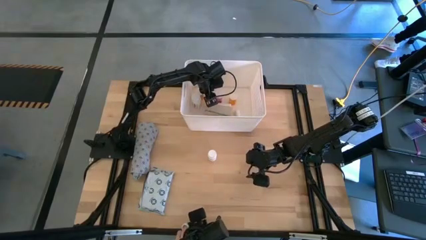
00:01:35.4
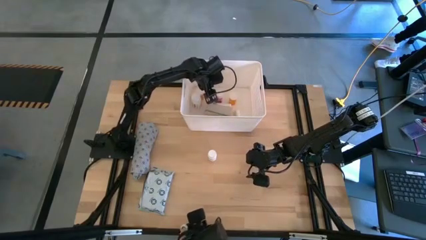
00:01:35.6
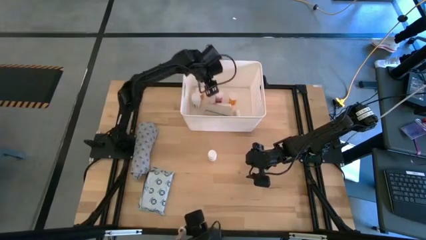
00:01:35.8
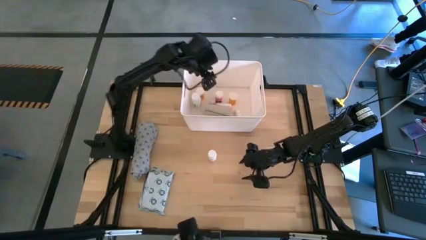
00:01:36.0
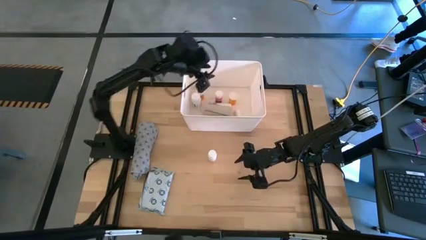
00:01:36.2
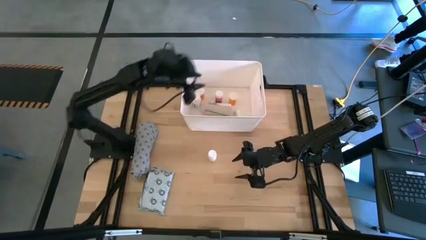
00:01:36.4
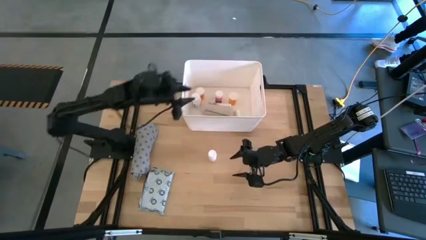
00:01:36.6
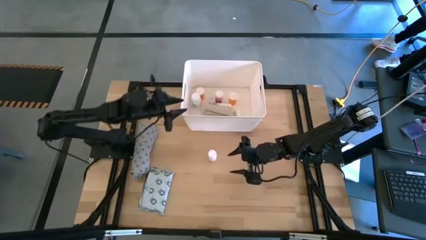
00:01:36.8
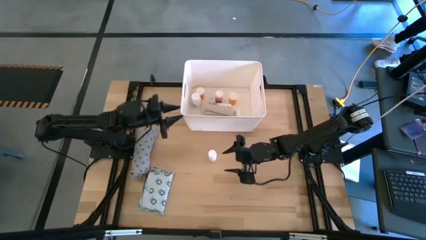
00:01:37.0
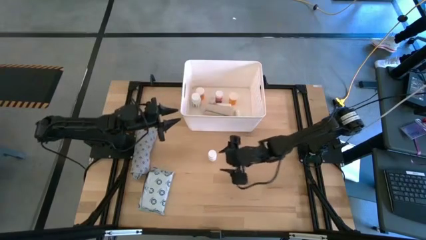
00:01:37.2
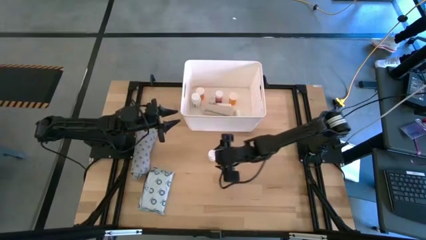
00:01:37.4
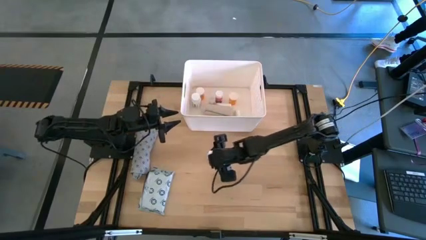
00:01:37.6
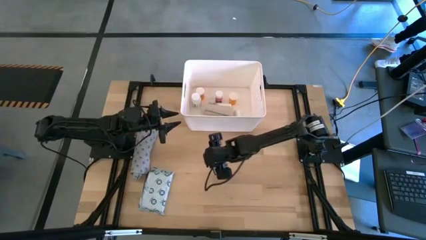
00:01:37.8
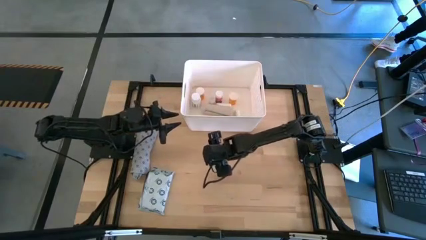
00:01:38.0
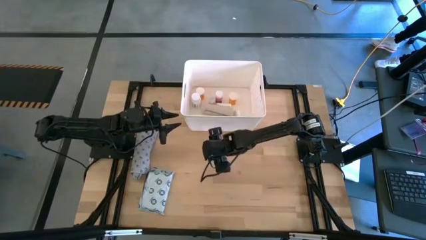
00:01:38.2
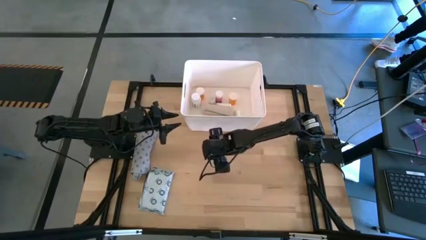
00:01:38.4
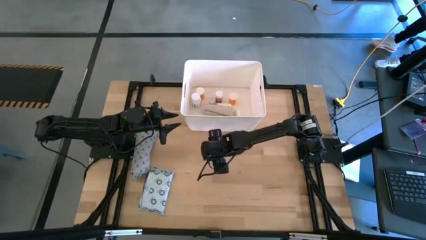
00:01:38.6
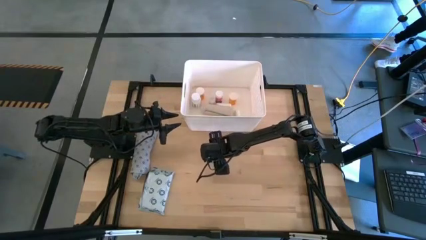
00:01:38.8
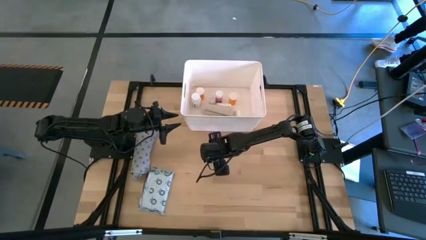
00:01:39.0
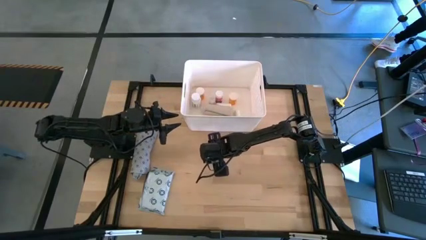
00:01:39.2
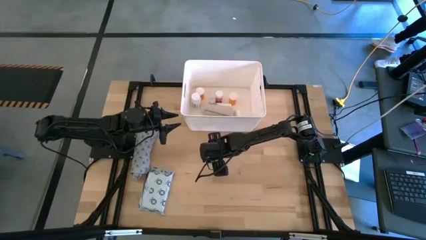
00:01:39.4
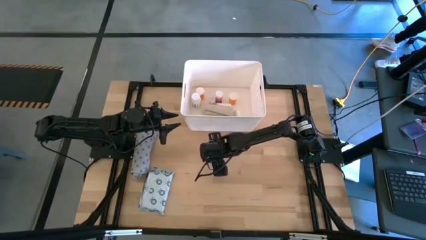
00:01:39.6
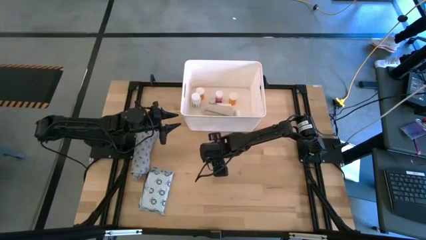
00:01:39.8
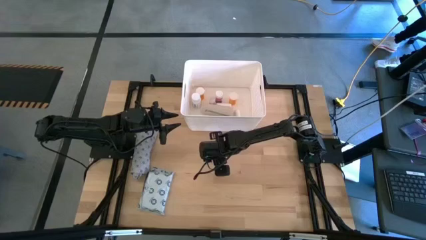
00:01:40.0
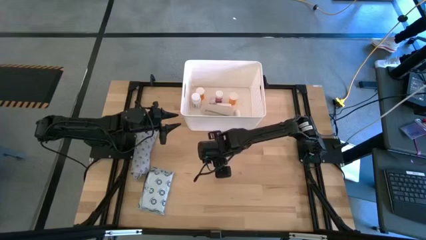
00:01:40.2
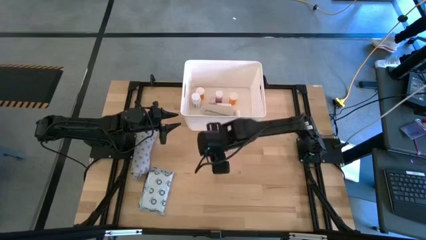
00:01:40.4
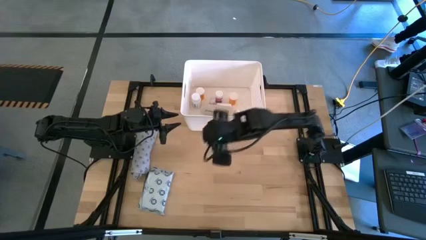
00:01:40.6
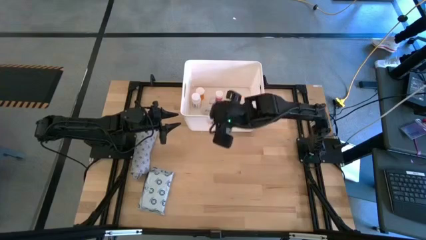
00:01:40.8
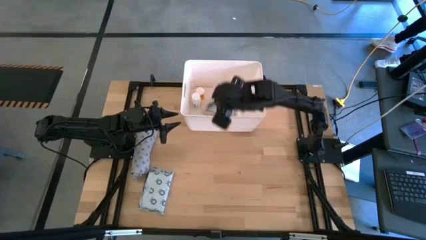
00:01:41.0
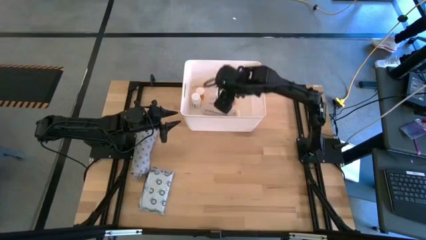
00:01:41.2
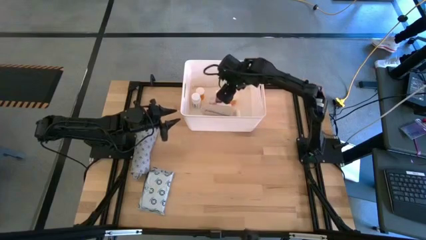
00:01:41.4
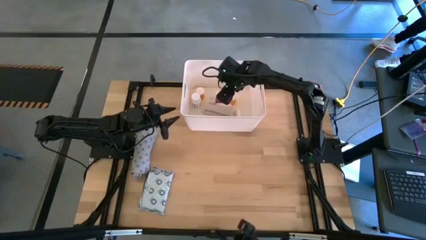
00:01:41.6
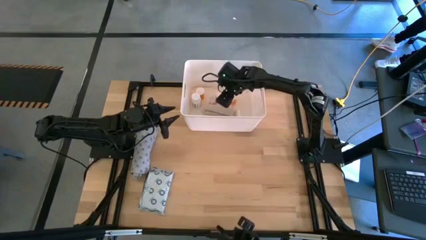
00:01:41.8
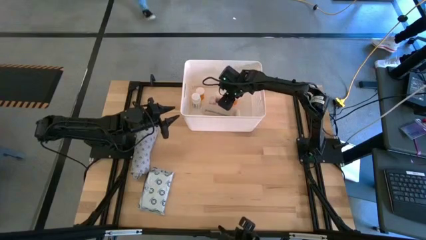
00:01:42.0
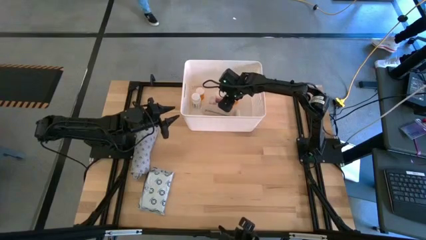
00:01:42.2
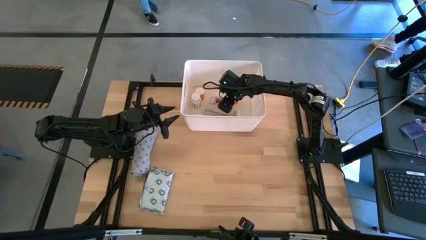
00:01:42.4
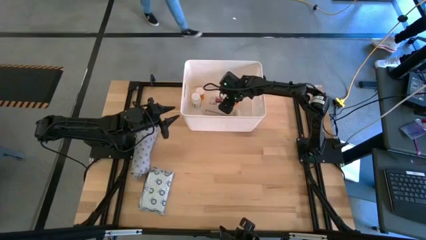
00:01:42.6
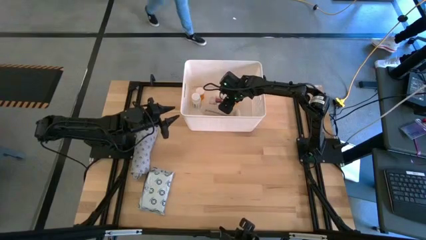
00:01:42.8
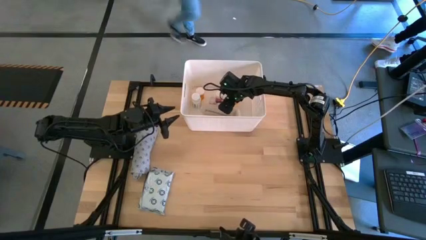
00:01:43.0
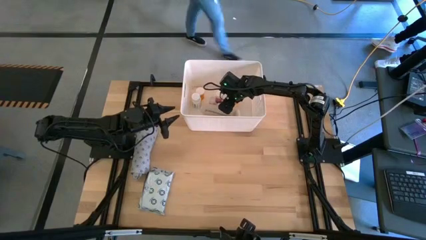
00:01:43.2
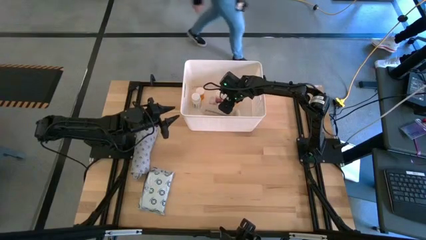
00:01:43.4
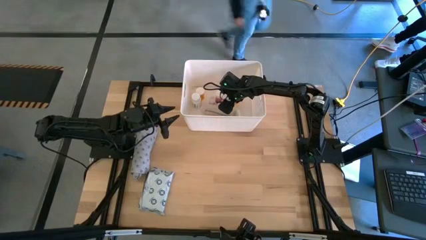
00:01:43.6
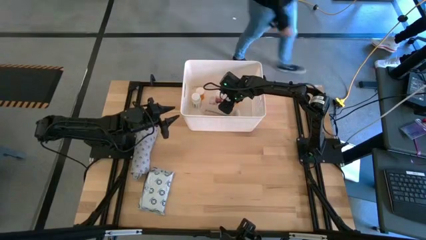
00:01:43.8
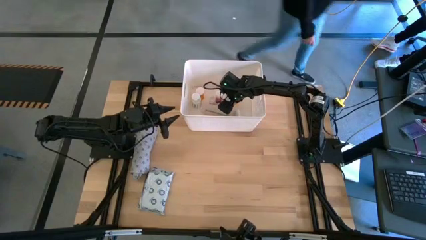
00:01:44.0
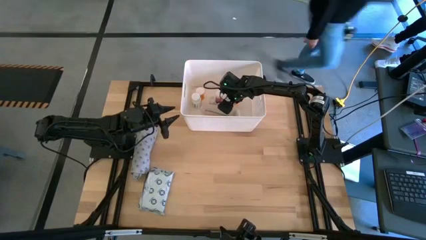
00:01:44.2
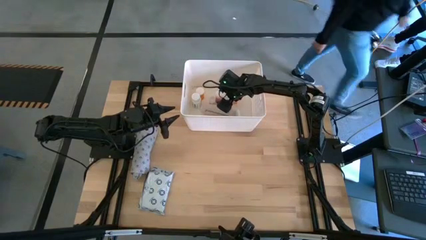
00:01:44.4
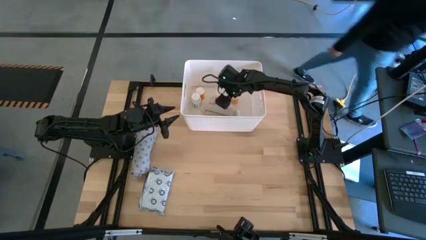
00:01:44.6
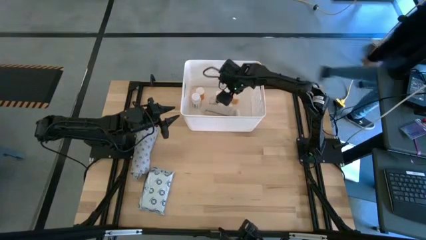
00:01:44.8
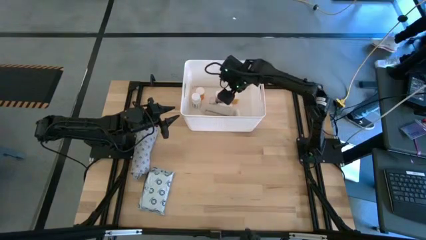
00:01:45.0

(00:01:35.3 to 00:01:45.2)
Task: Pick & place medical supplies in basket/bin
Put the white pill bottle into the white bin

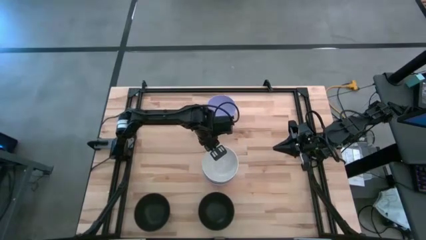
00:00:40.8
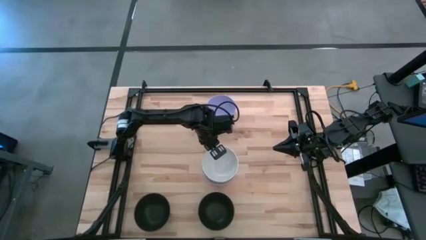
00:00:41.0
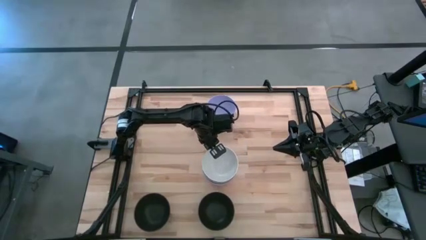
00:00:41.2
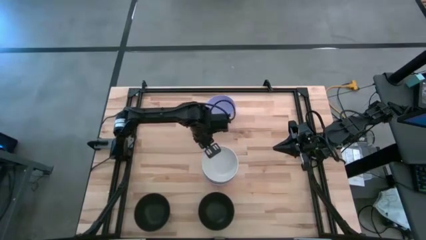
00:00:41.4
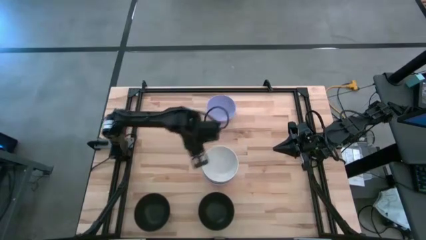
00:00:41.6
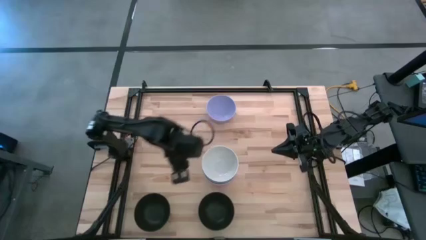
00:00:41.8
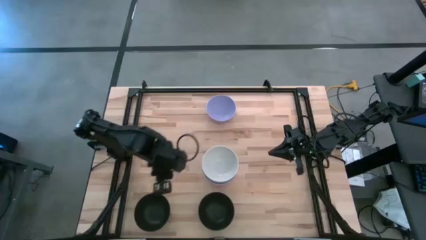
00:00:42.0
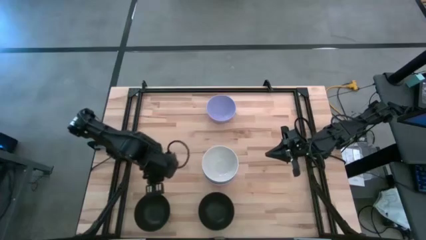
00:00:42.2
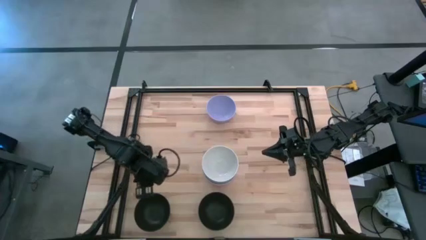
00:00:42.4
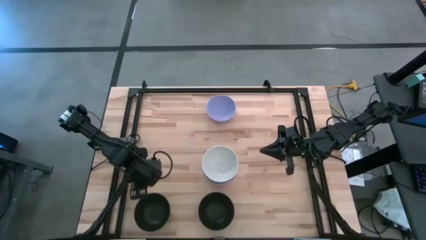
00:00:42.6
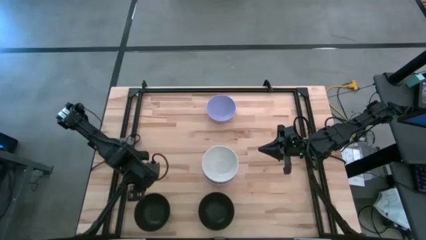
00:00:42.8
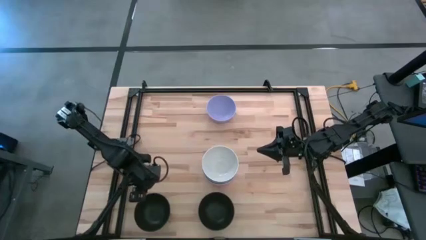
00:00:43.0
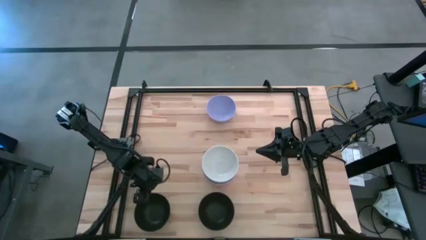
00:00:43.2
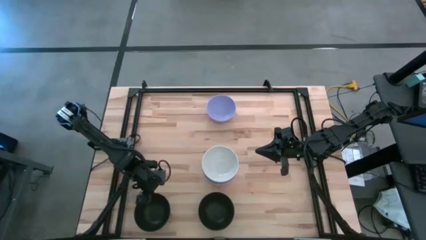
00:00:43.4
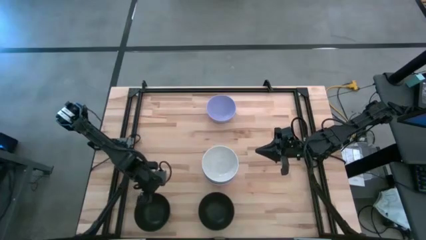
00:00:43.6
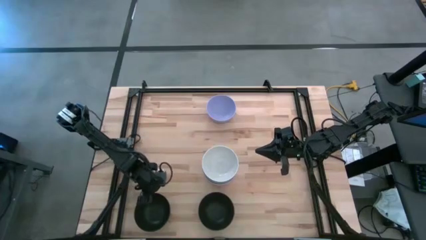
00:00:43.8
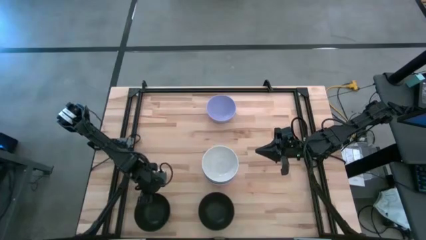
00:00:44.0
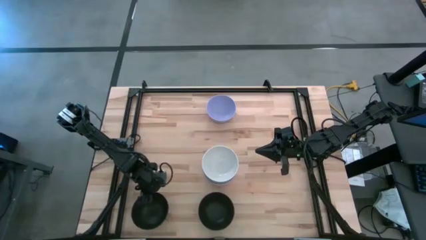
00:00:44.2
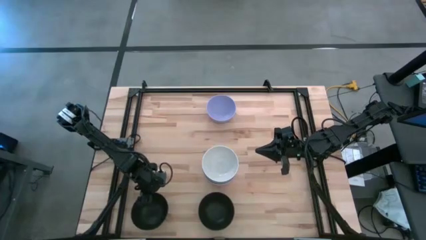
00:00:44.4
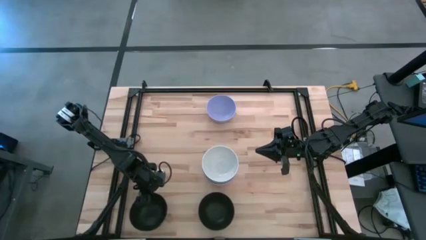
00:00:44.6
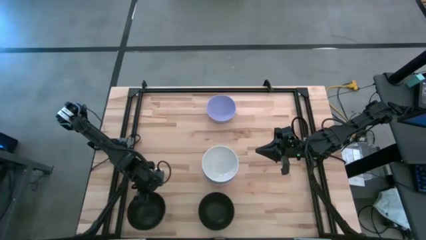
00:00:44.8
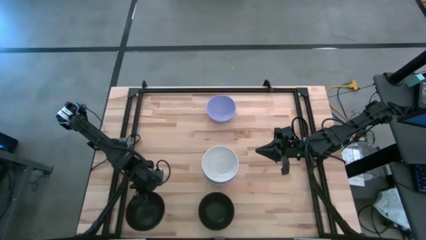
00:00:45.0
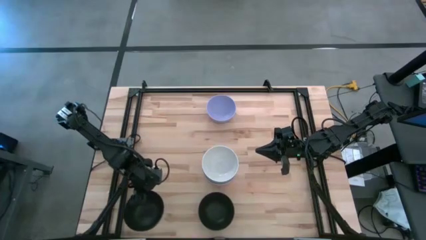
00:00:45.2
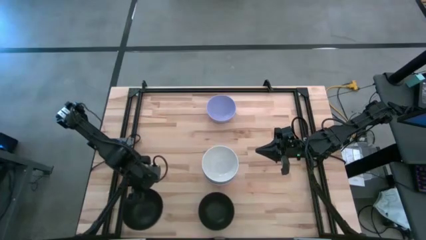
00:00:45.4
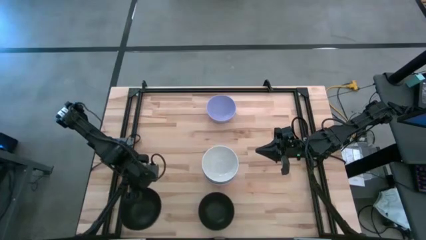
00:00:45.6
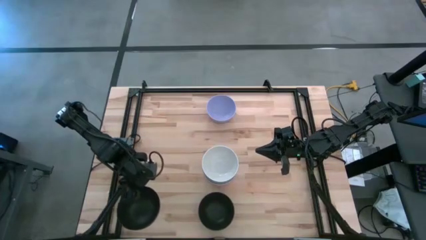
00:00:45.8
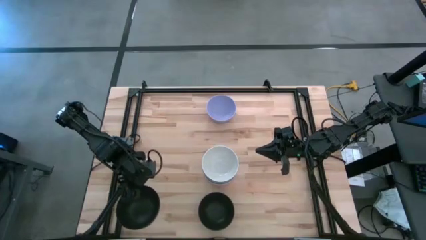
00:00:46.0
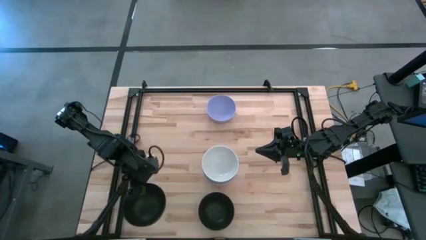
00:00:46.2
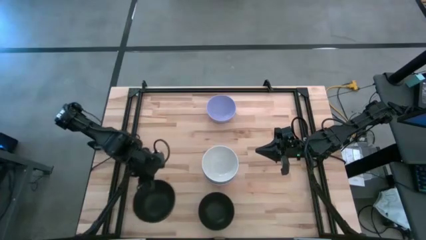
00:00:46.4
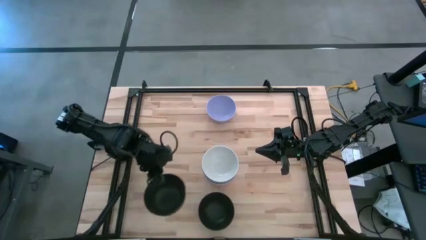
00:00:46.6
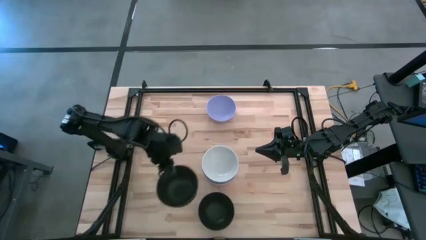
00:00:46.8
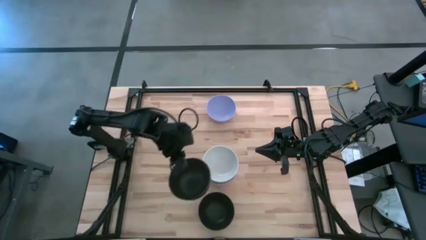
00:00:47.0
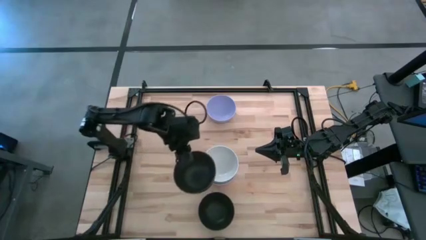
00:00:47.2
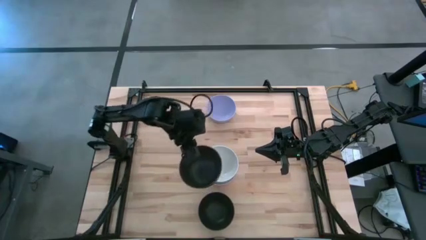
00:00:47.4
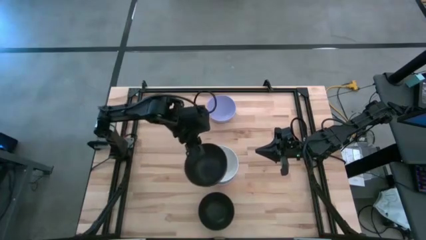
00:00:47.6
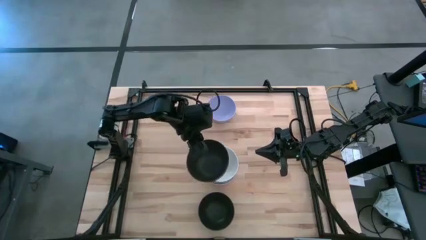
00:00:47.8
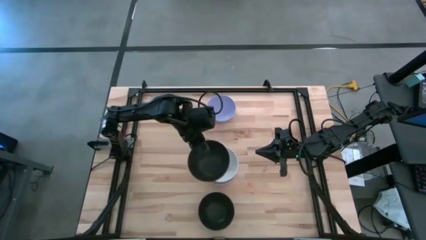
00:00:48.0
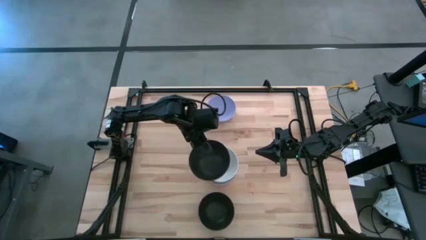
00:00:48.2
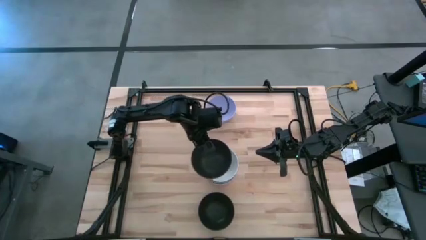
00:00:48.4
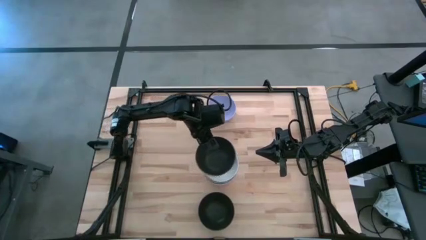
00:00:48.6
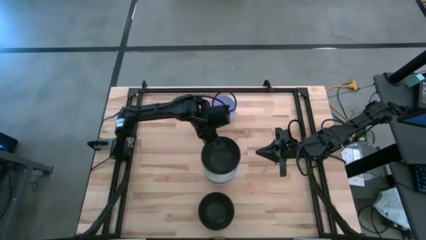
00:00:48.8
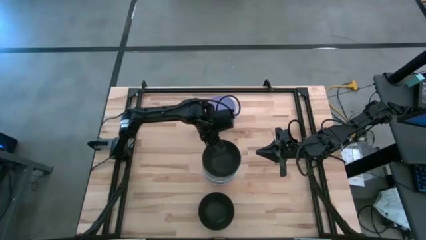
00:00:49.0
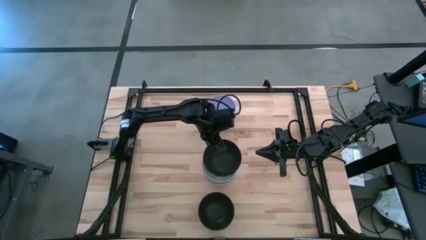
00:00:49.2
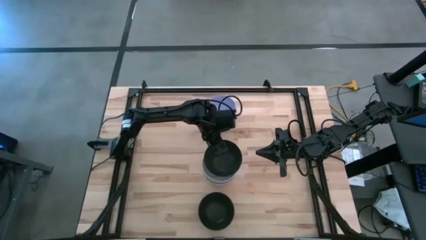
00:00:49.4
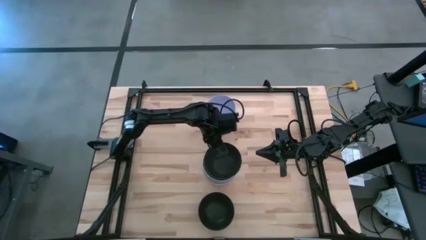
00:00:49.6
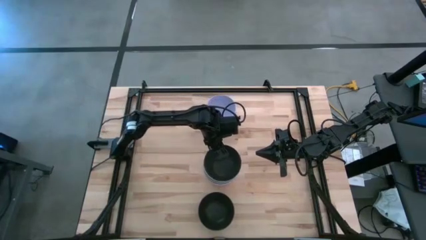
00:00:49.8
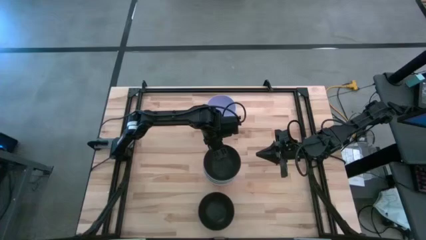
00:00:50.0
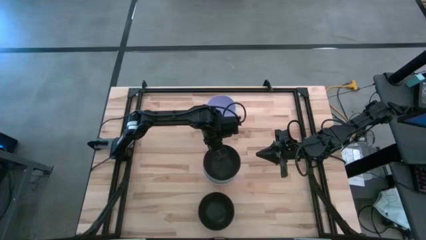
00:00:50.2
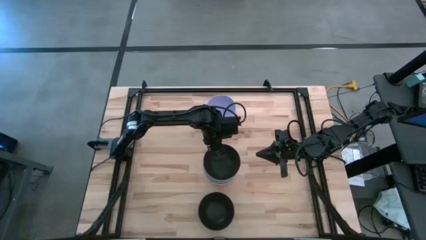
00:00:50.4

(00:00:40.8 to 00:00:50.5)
Task: Nest bowls inside each other
Stack the left black bowl on top of the white bowl
